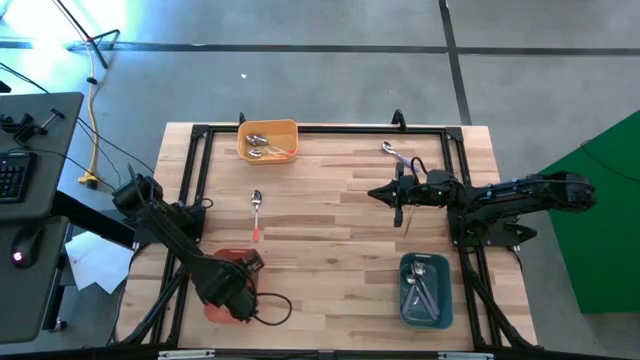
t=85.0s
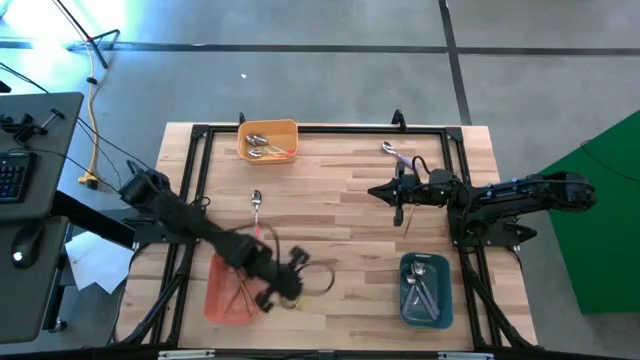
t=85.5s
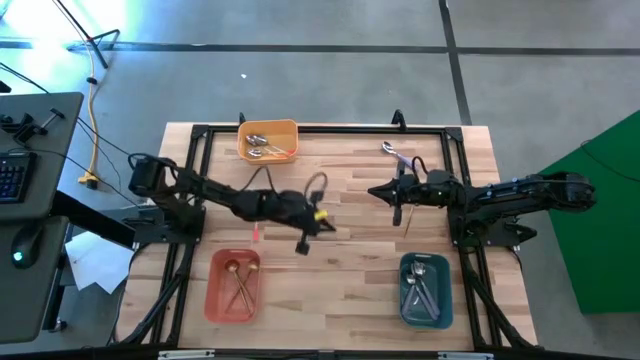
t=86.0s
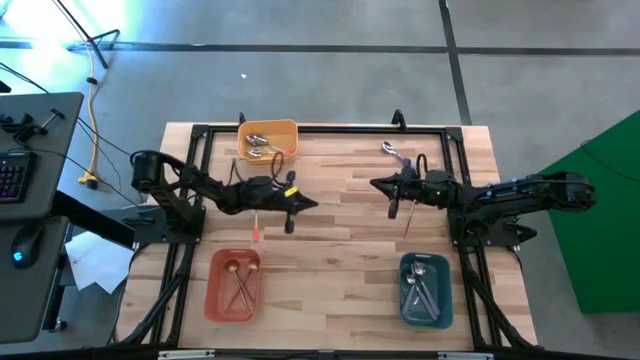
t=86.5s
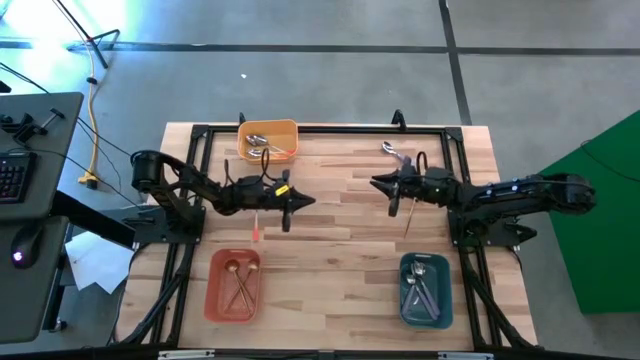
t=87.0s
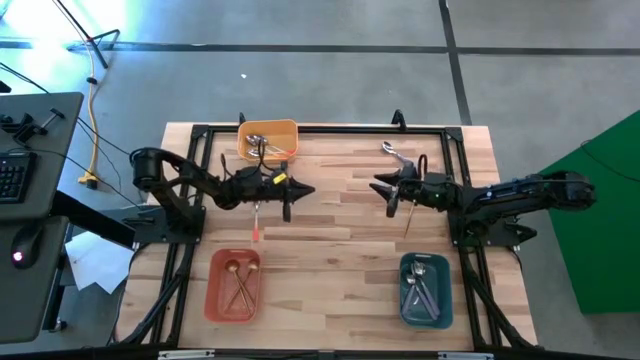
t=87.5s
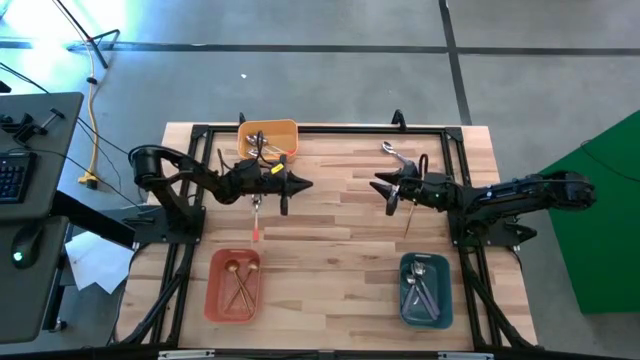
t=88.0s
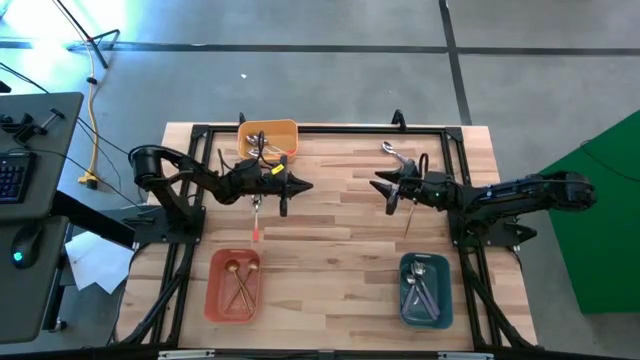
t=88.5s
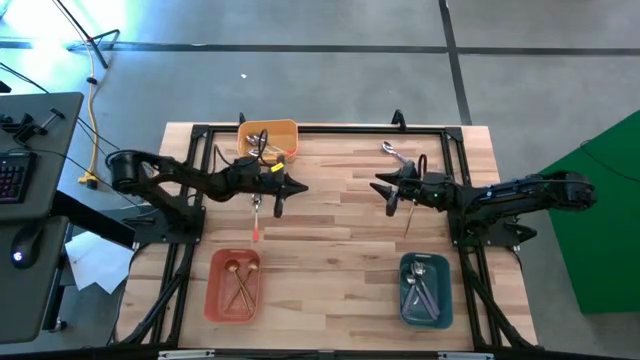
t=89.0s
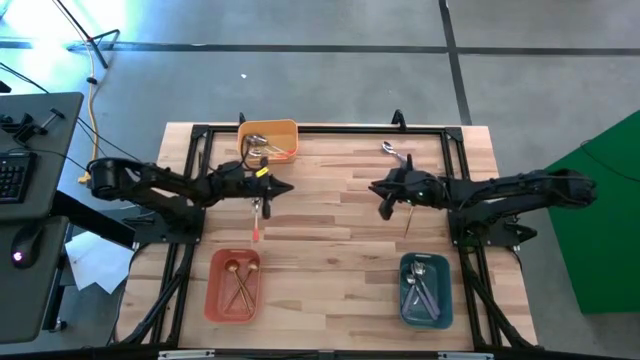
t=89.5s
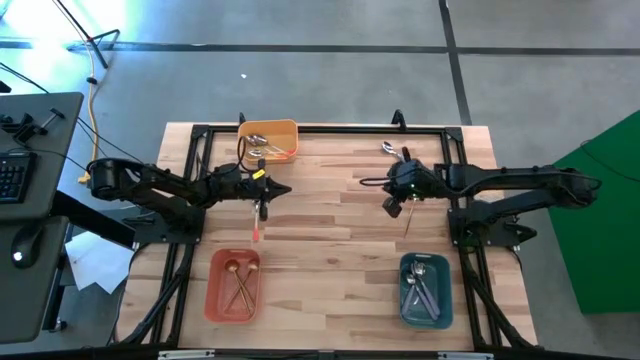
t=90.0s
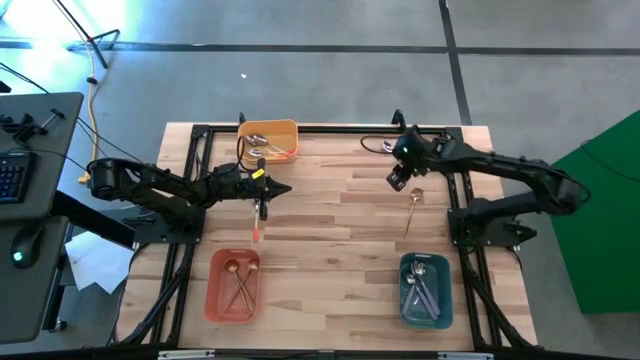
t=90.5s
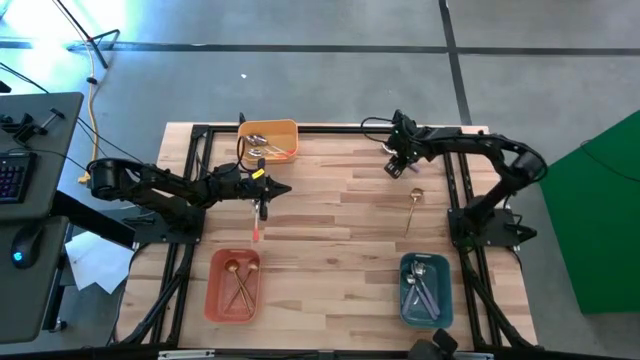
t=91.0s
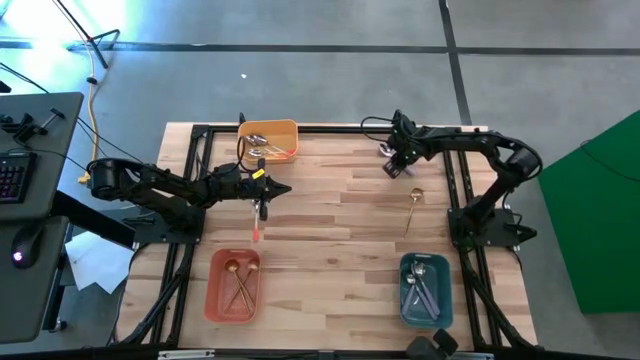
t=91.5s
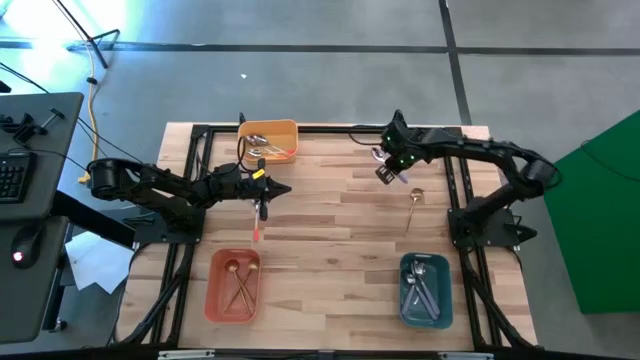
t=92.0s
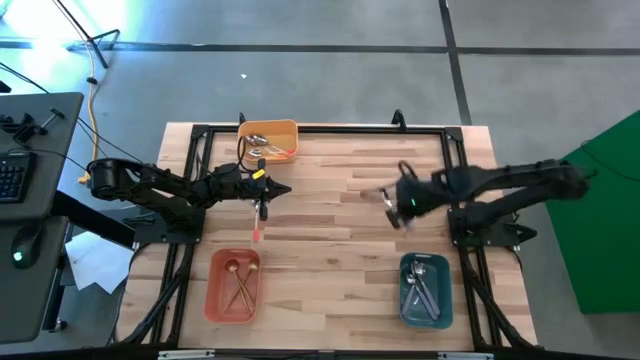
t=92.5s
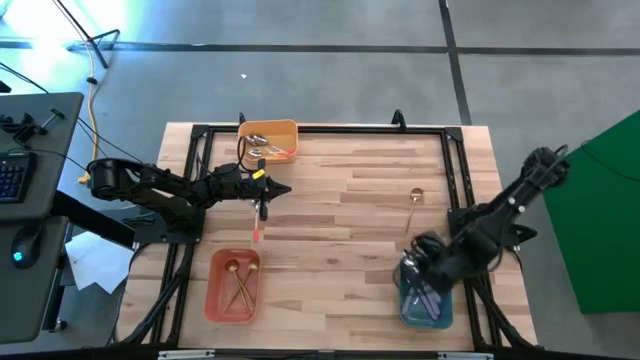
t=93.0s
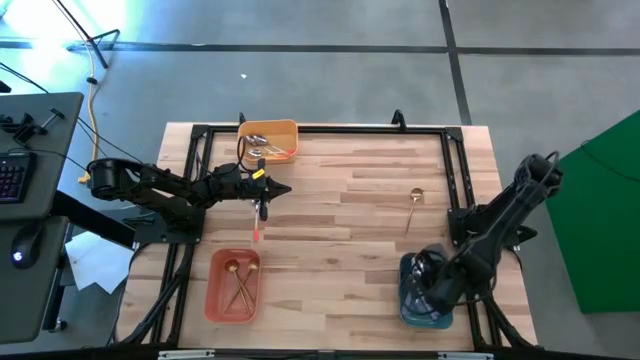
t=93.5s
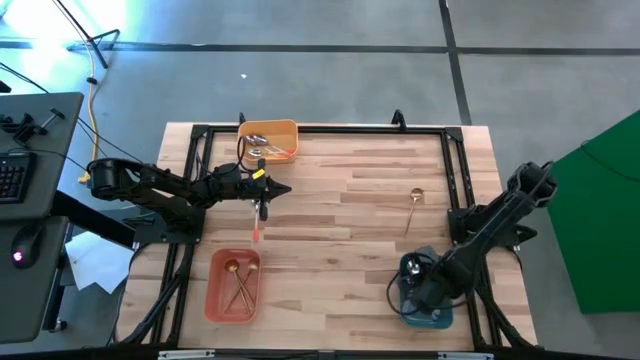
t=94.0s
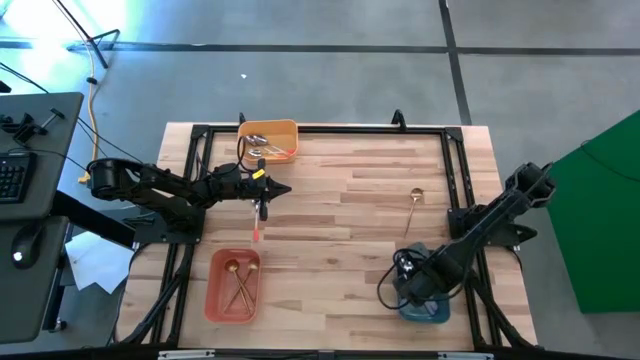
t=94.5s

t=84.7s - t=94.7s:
Task: Sort silverware by color (type)
Put the violet spoon into the blue bin

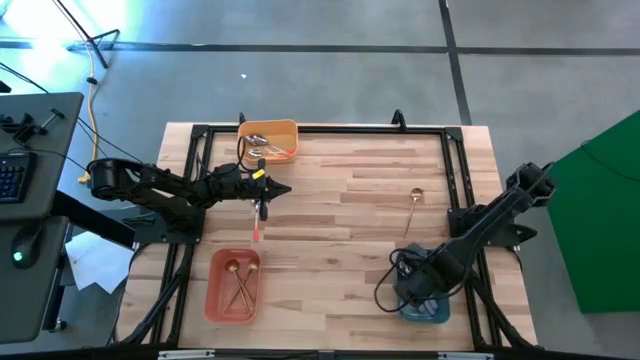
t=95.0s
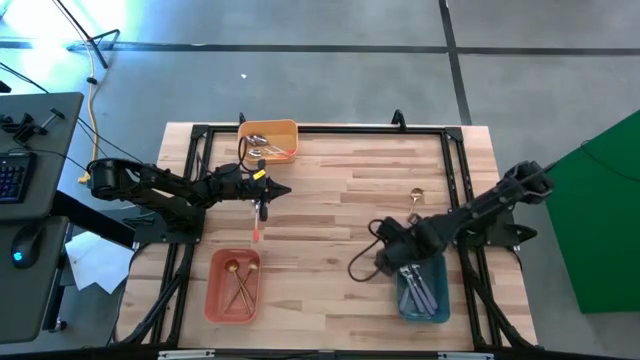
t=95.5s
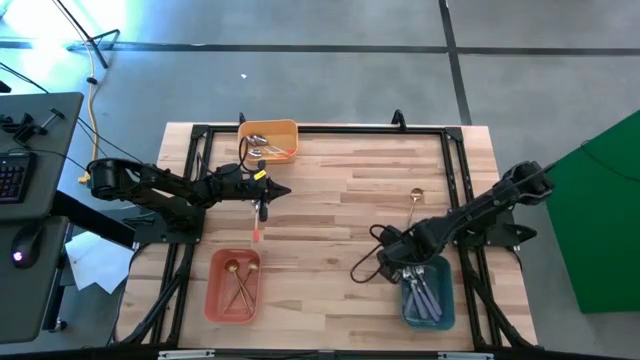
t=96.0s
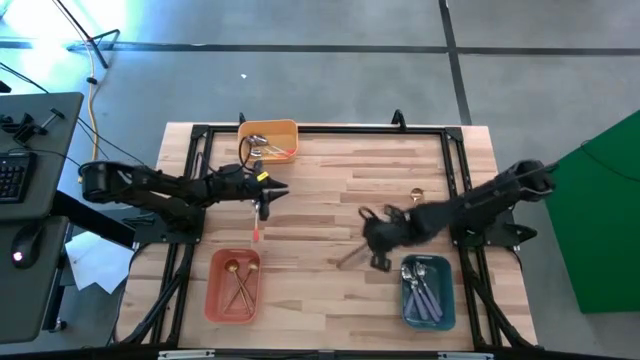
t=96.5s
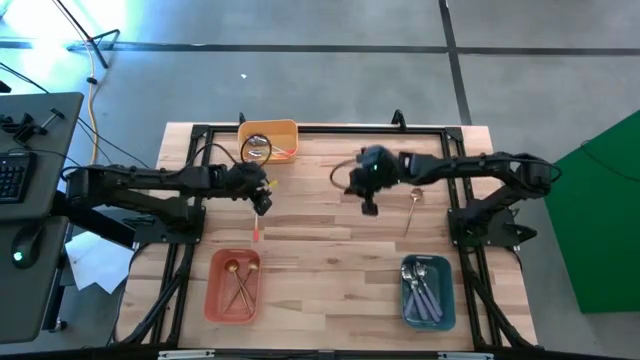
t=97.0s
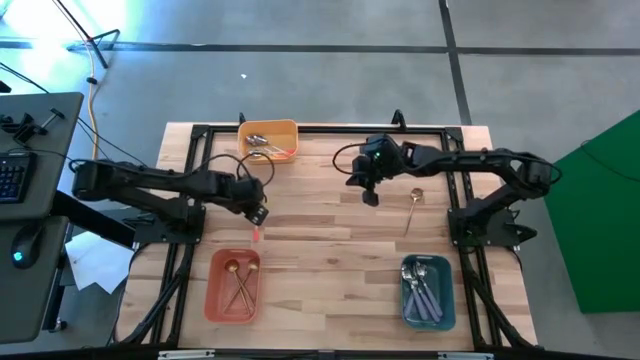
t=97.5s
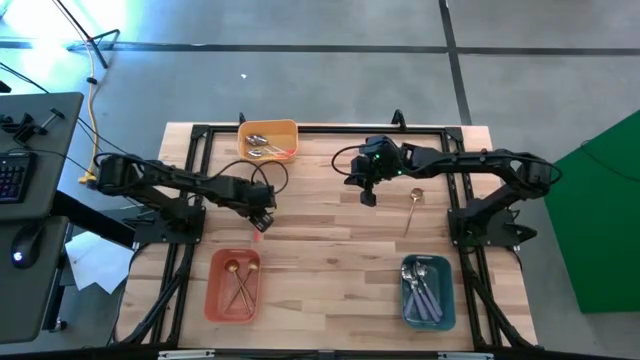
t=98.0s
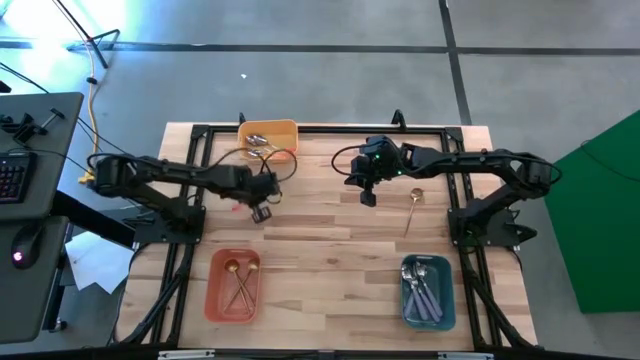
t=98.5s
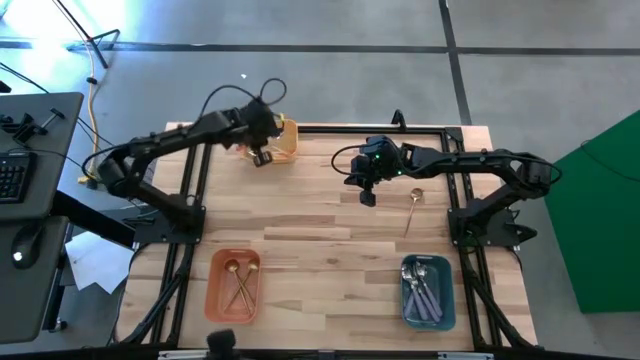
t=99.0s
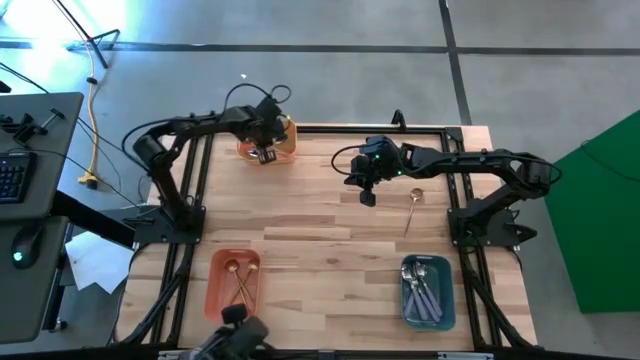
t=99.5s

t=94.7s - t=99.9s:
Put the orange spoon into the yellow bin

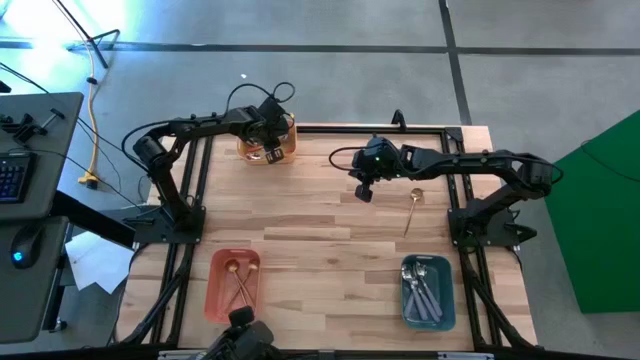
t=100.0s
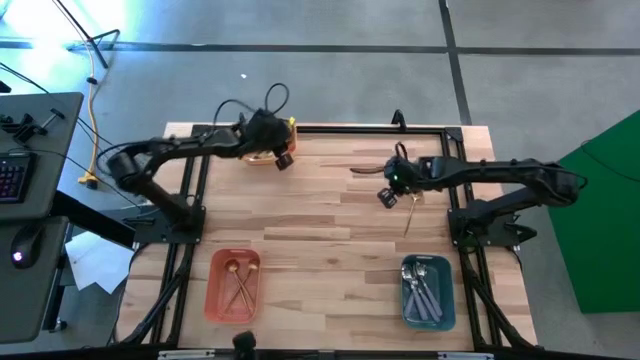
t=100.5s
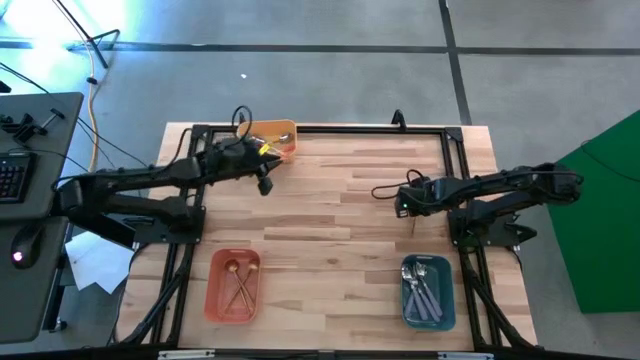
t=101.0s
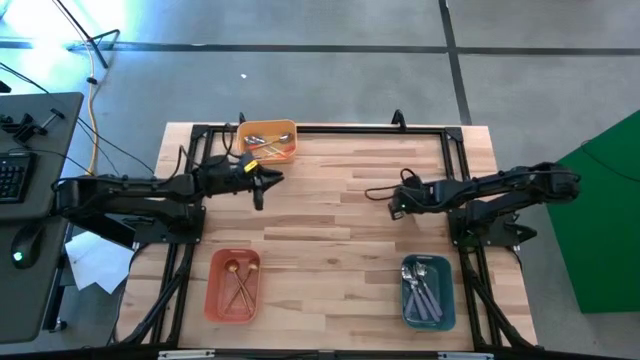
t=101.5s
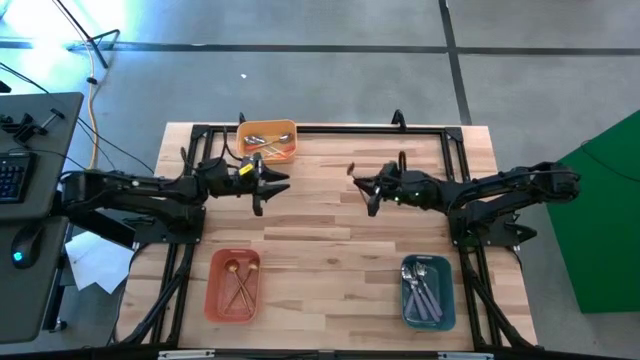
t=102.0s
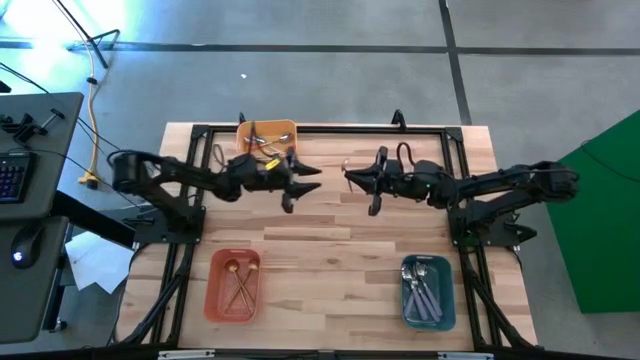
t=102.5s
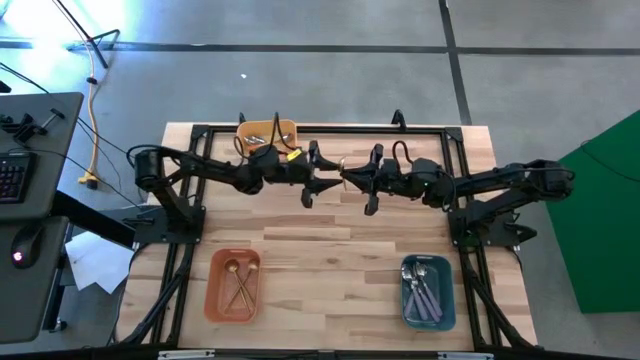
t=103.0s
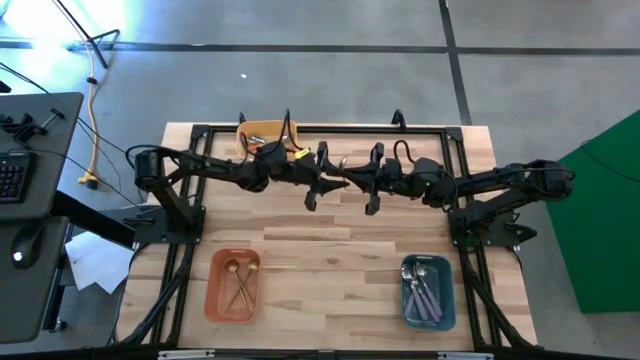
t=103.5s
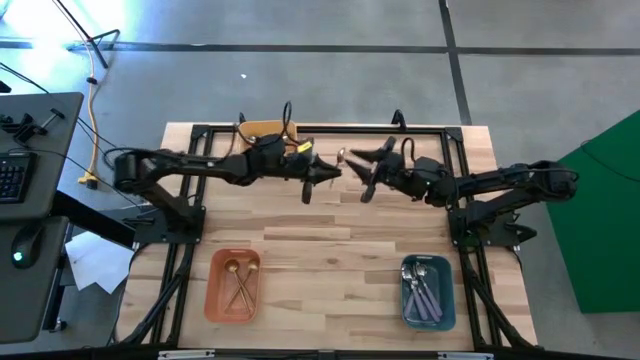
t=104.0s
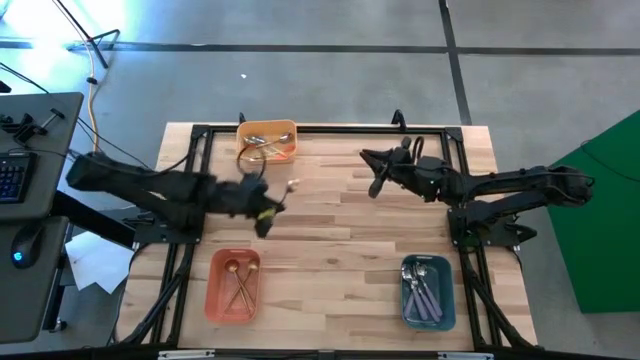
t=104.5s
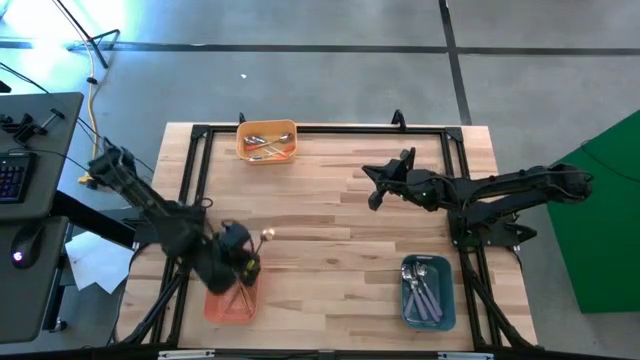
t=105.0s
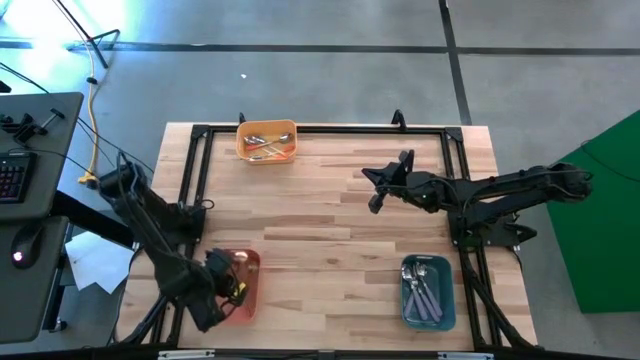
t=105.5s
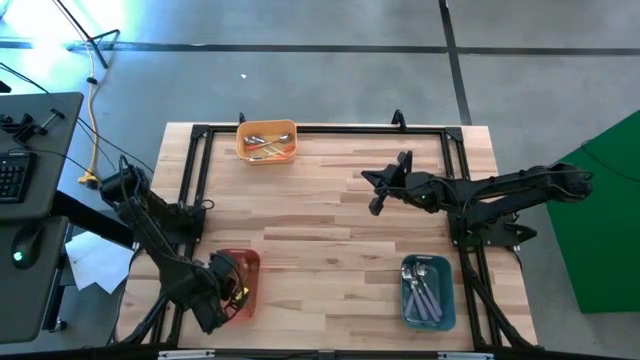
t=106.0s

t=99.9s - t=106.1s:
Put the gold spoon into the orange bin
